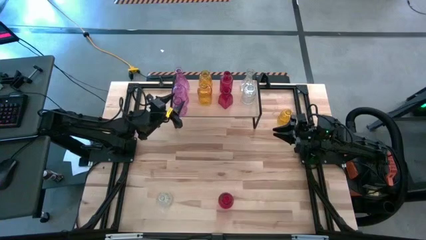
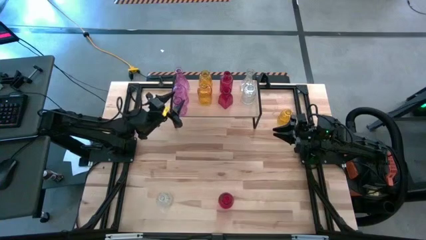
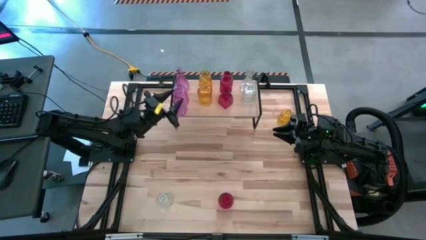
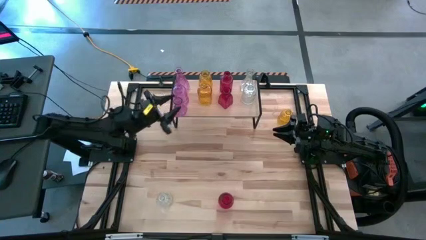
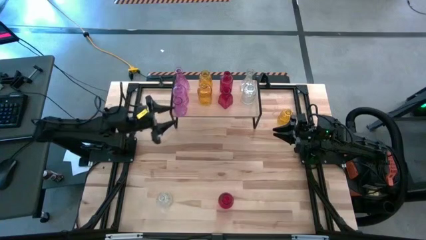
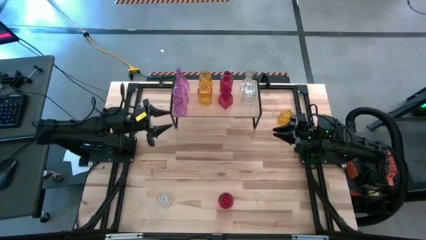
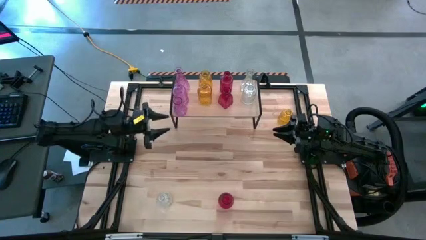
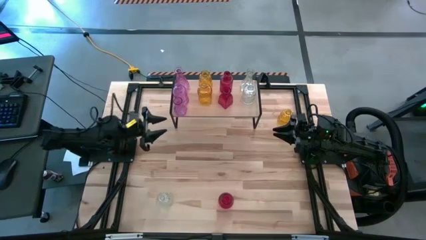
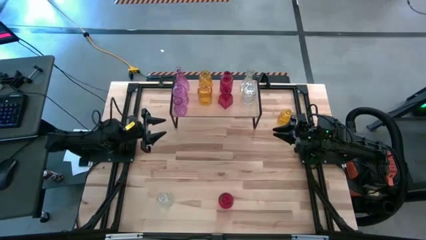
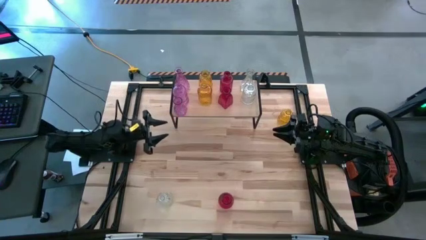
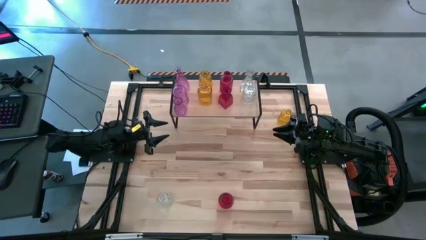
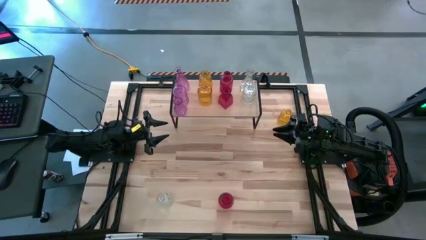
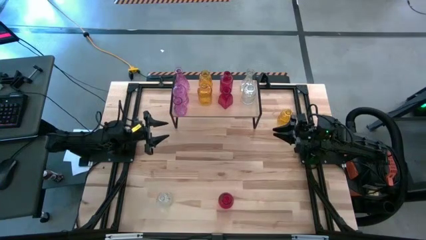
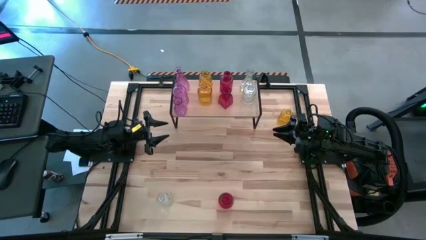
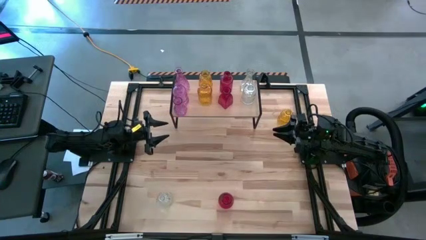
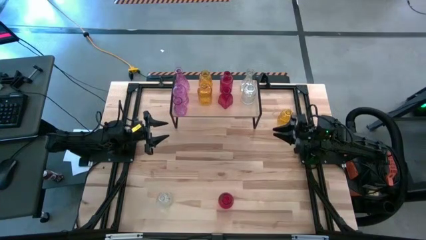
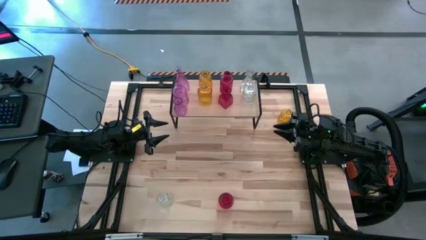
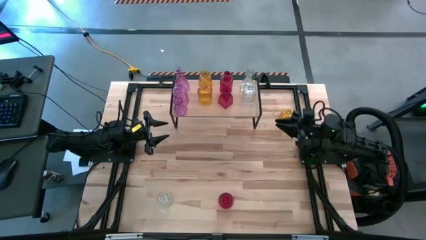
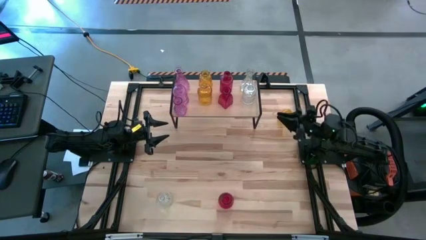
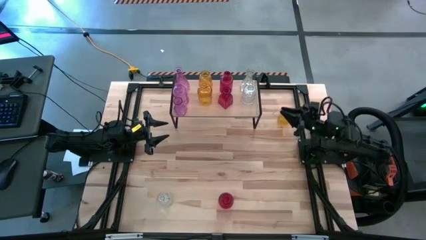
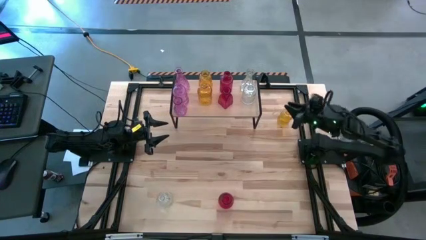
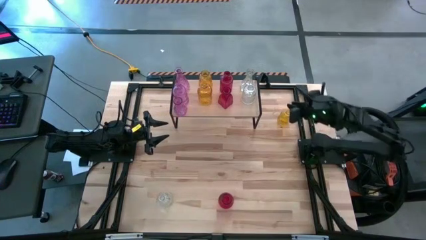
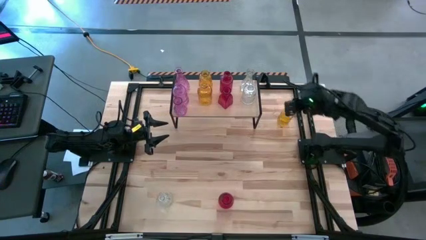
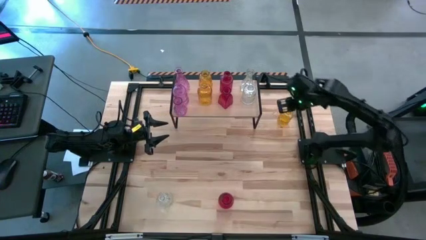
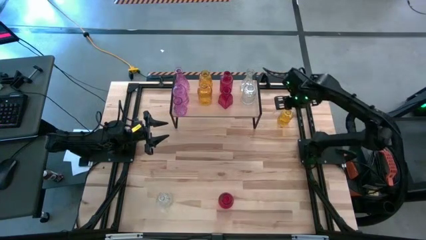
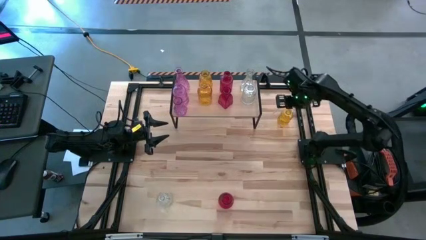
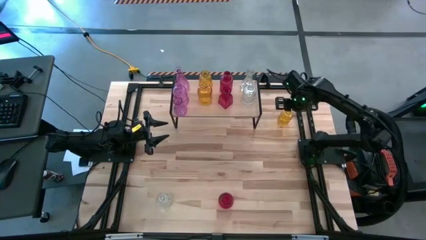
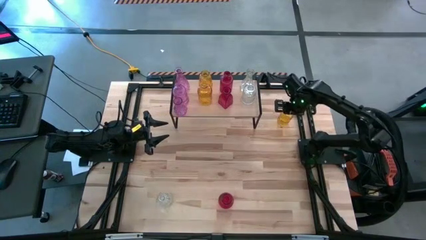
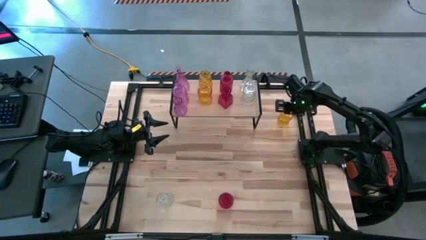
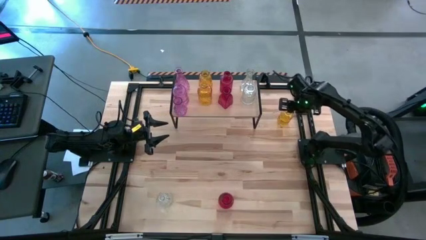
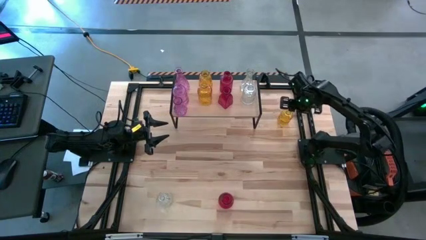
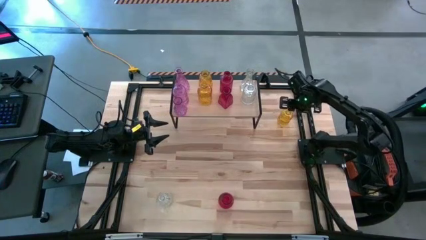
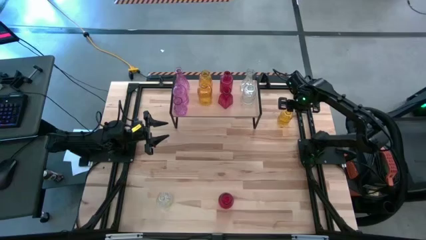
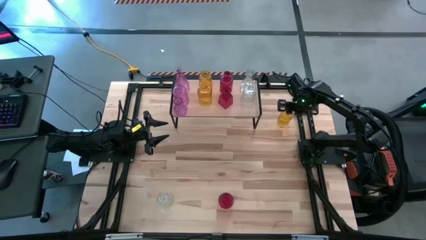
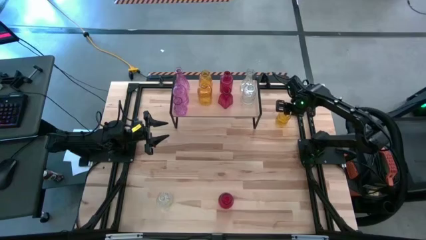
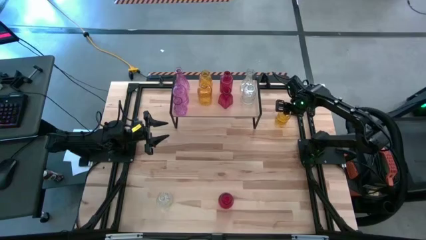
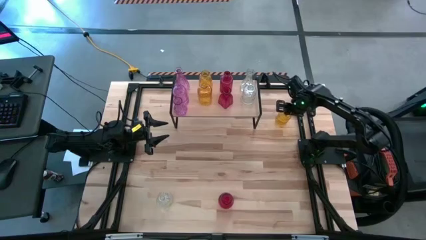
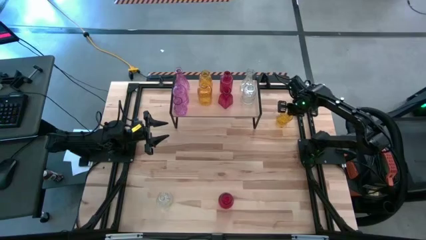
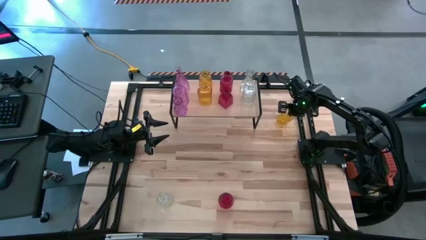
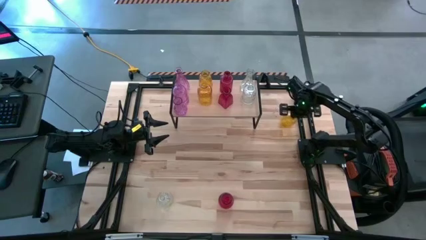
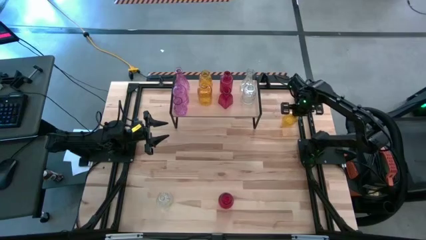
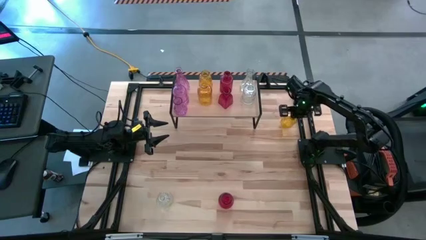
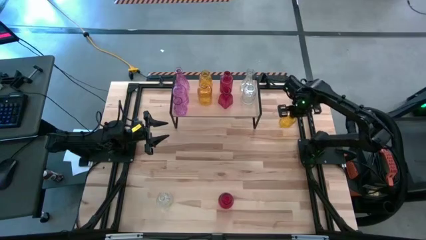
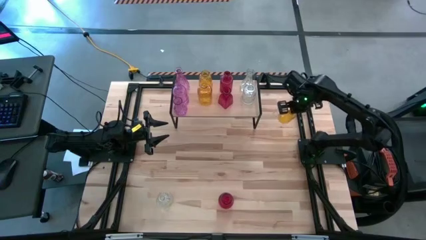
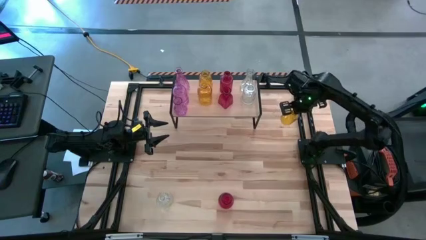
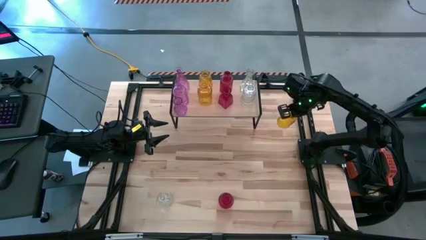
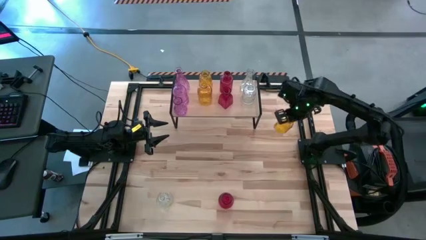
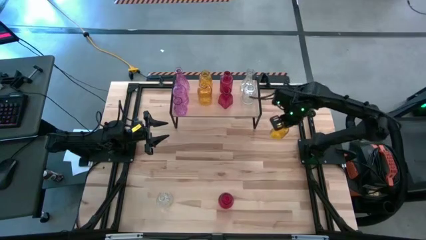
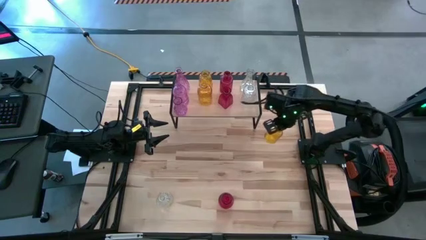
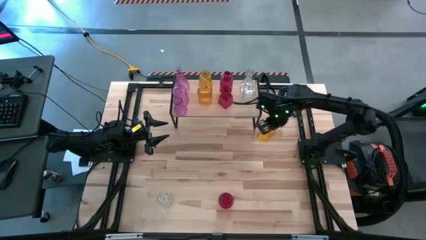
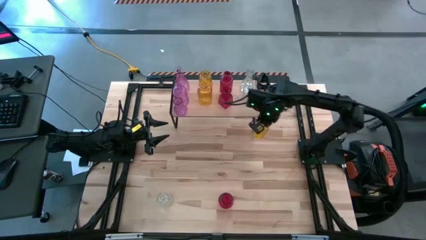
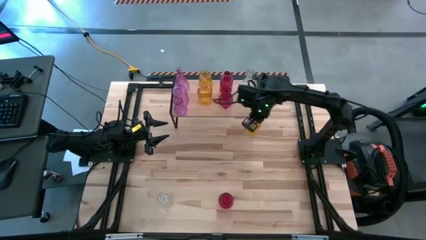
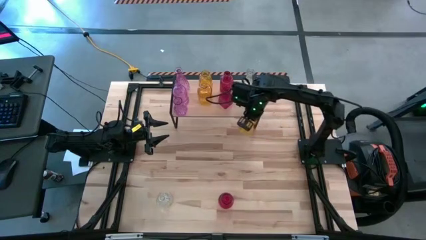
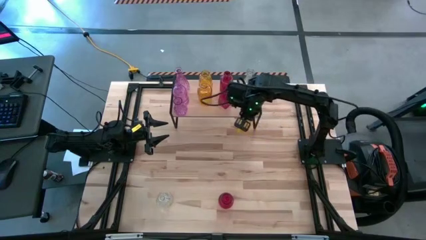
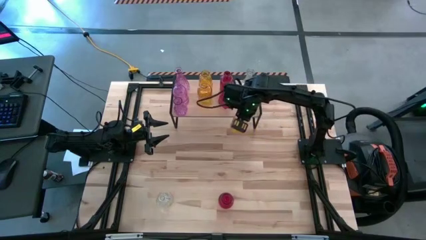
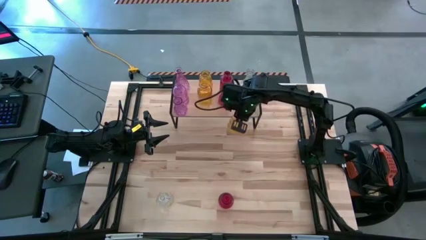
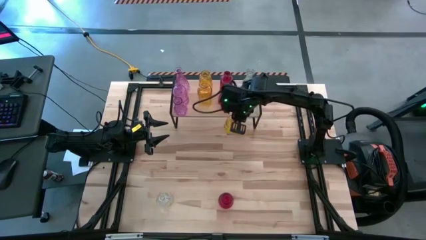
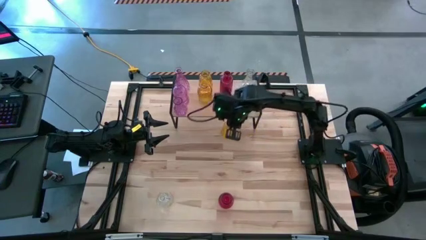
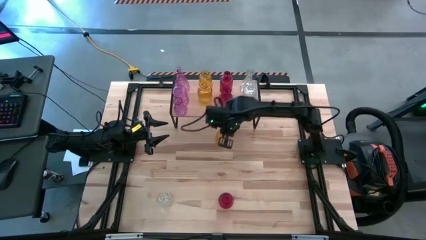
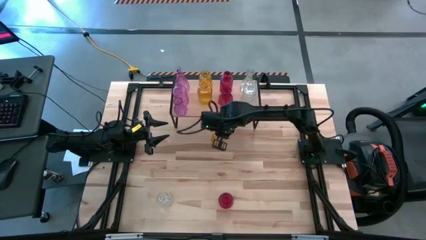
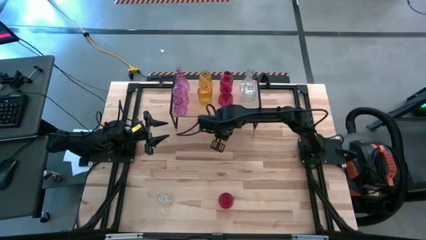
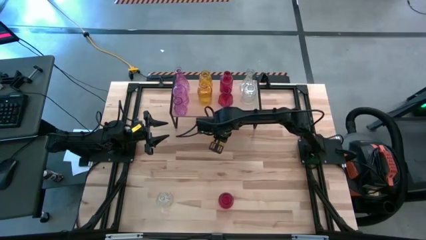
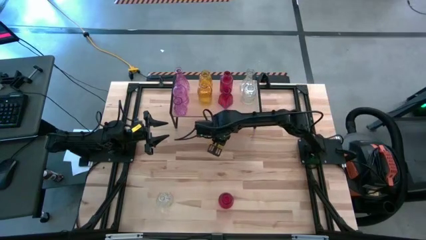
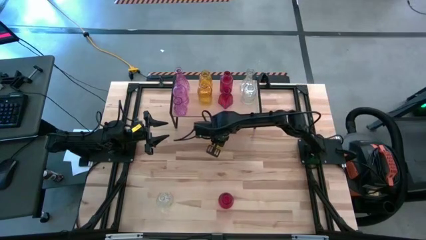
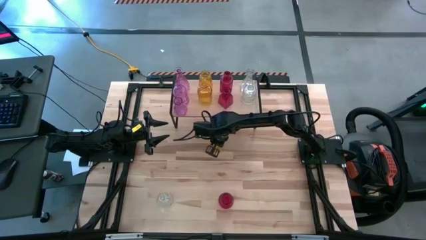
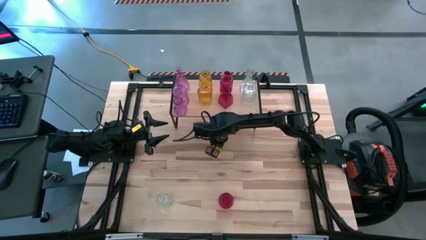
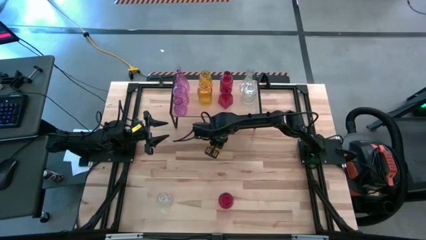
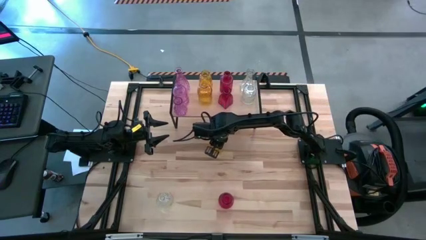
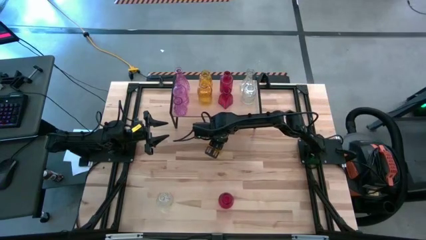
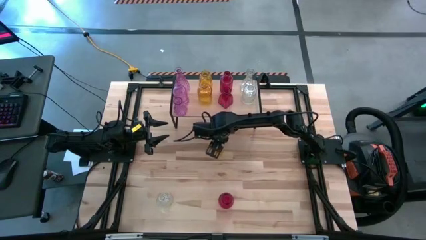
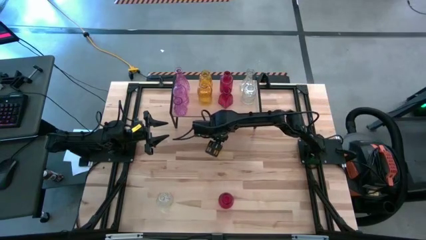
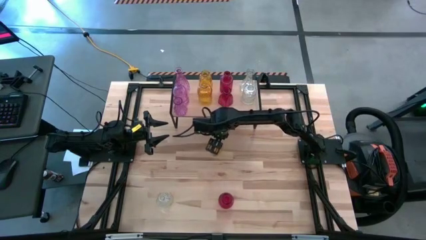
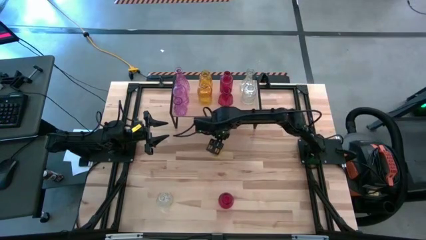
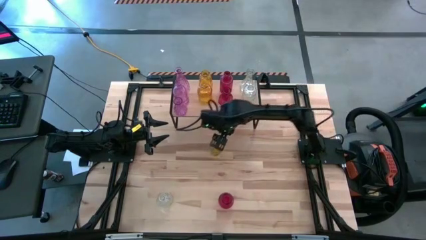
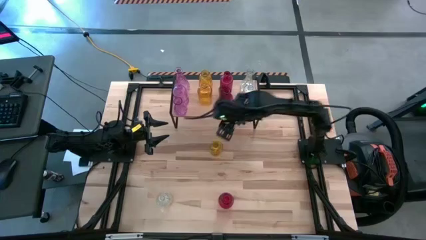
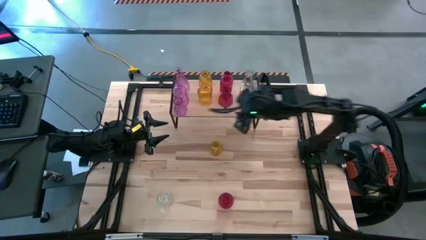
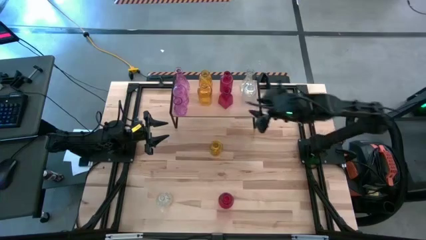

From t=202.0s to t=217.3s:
Task: sort vases onto shelf
Put the yellow vase on the shelf and align it with the other yellow vases

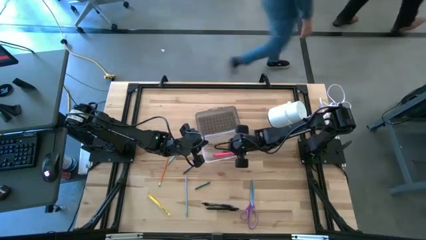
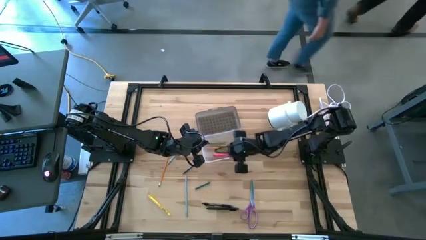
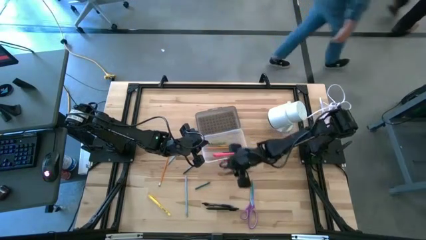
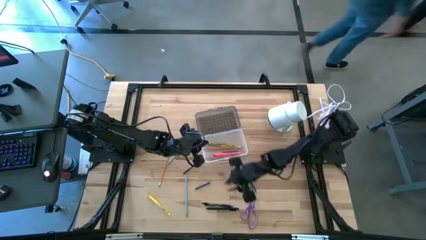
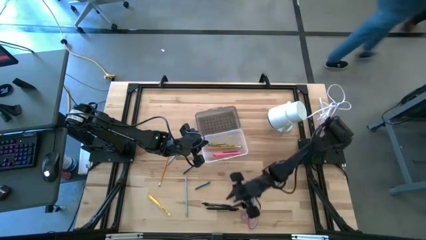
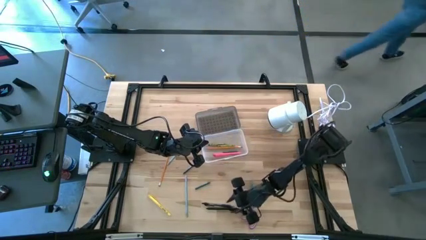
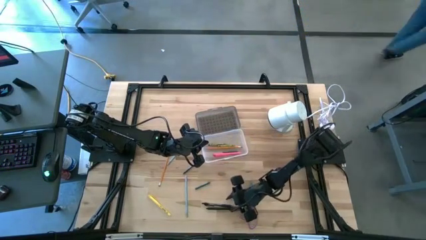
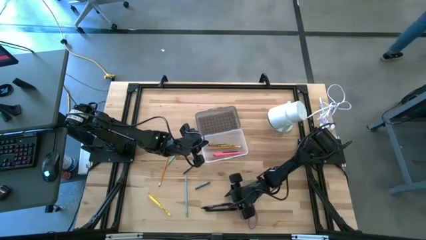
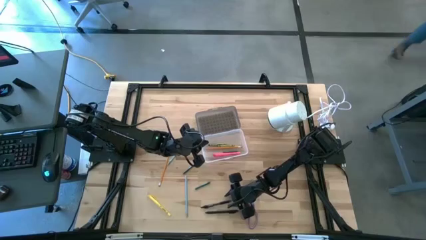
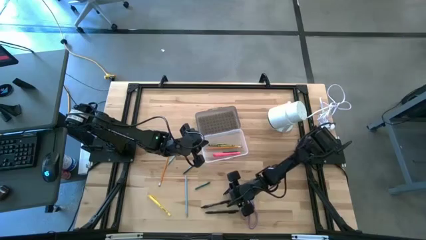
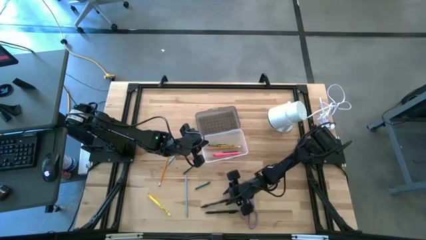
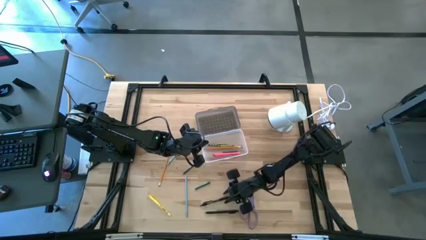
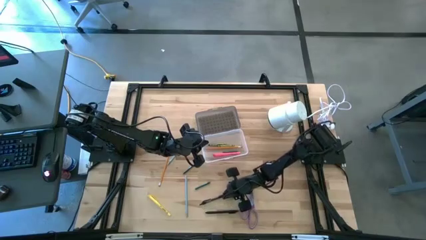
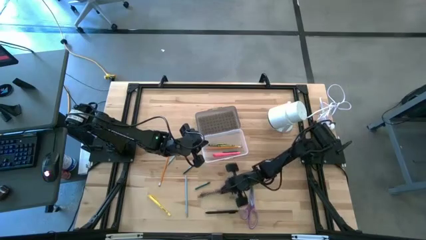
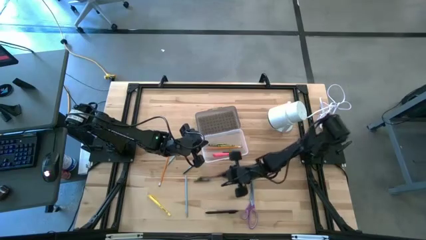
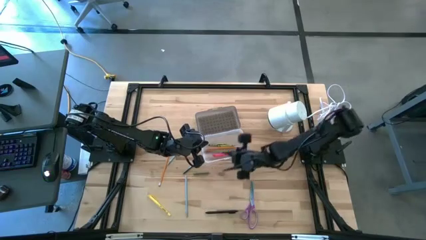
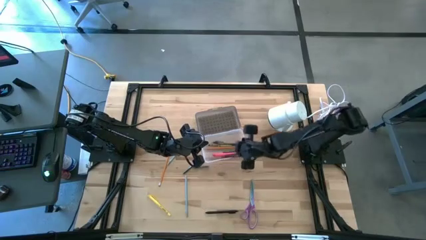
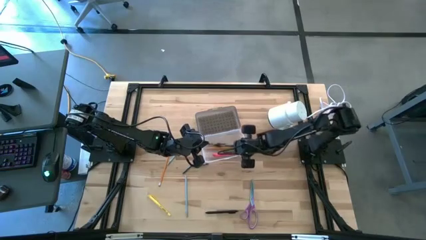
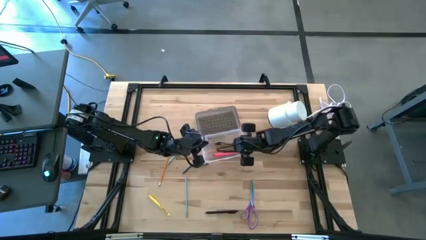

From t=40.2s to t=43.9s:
Task: Pick & place school supplies into a supply box
Put the top black pen into the gray supply box
